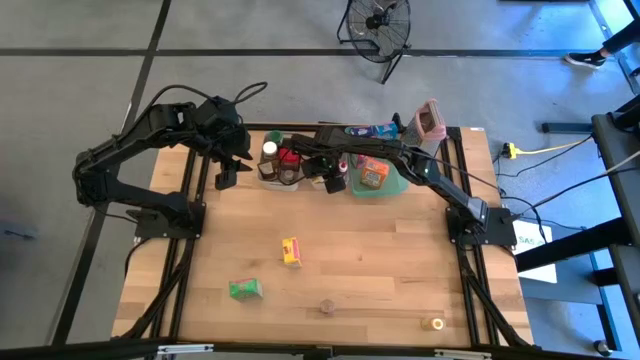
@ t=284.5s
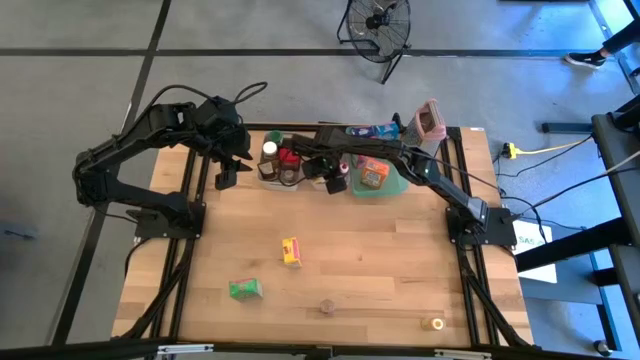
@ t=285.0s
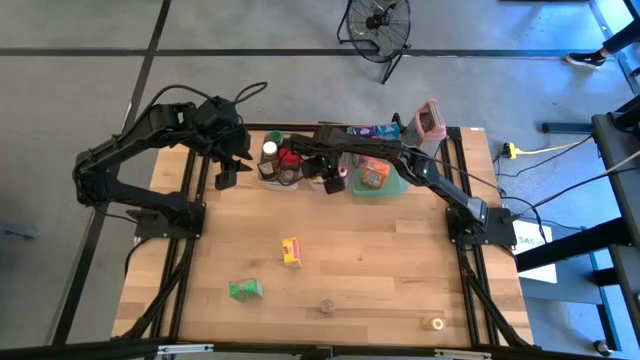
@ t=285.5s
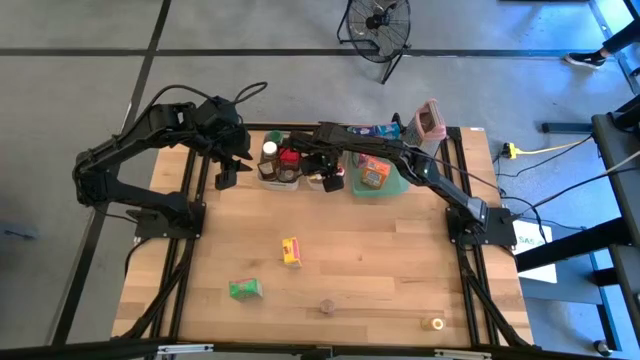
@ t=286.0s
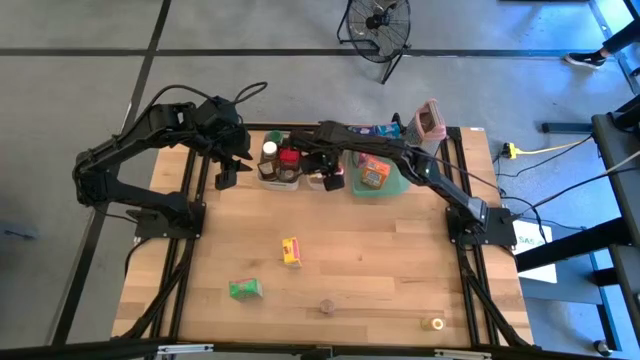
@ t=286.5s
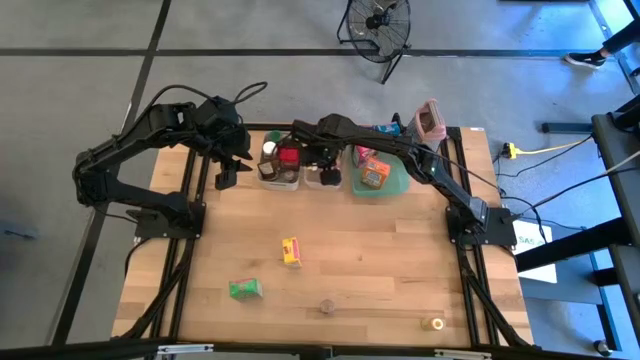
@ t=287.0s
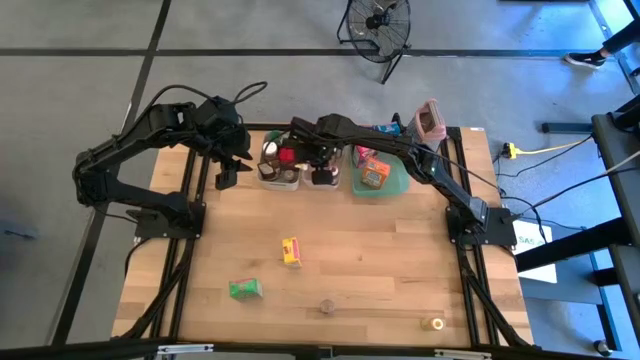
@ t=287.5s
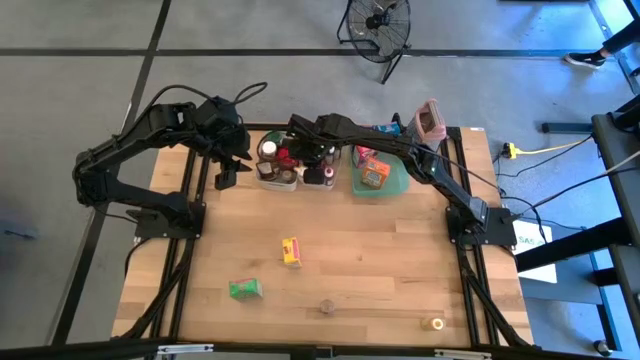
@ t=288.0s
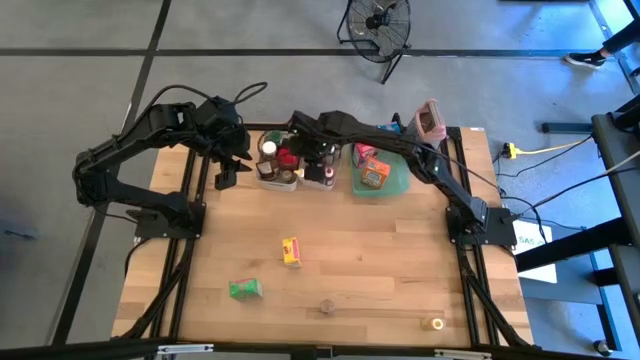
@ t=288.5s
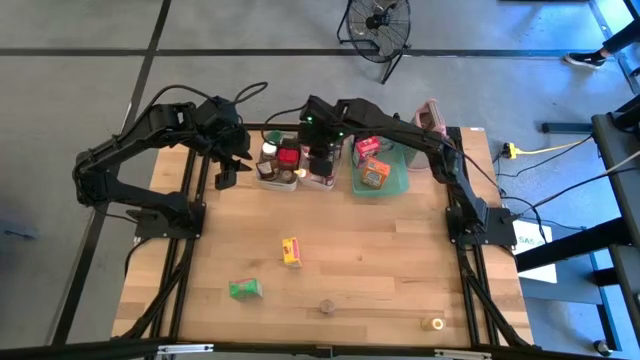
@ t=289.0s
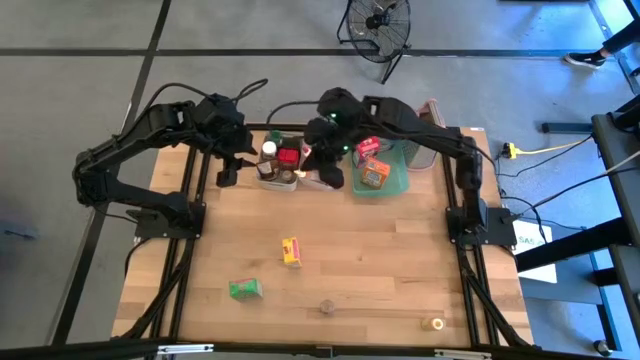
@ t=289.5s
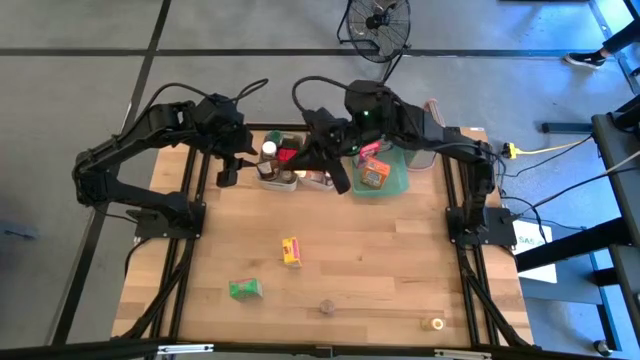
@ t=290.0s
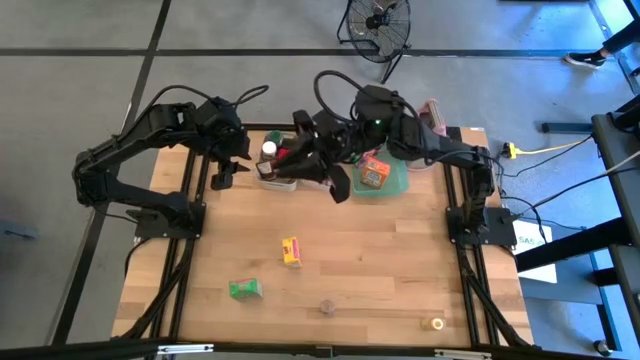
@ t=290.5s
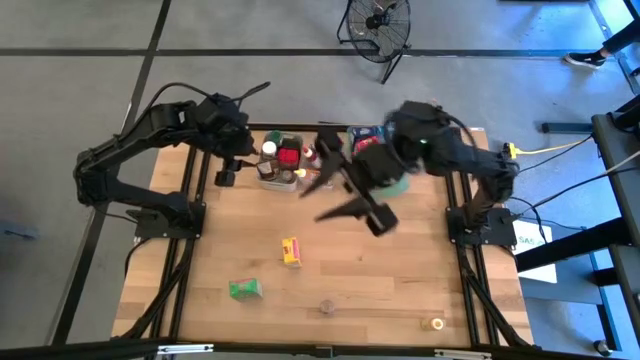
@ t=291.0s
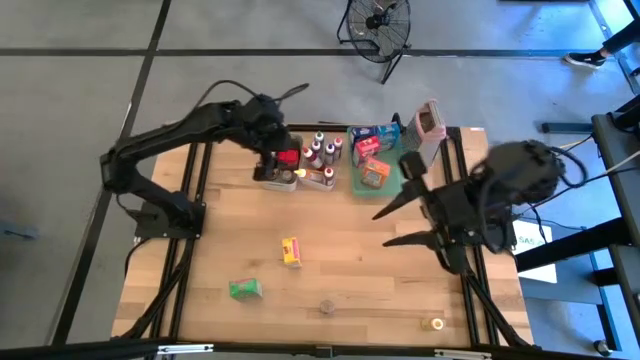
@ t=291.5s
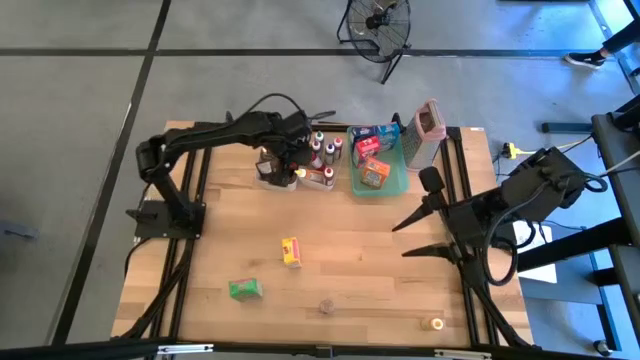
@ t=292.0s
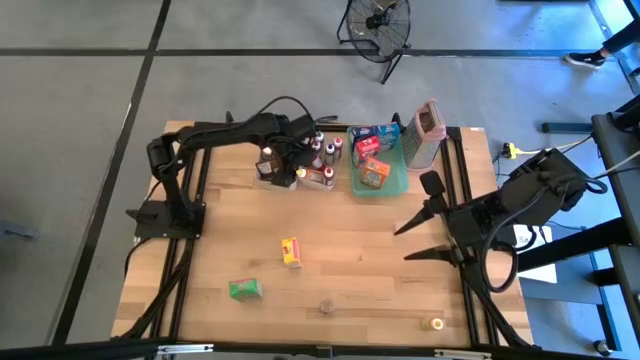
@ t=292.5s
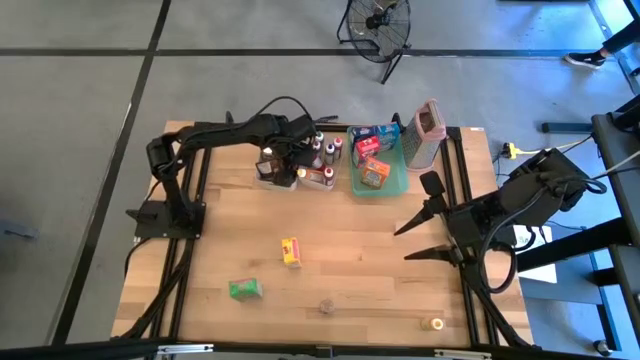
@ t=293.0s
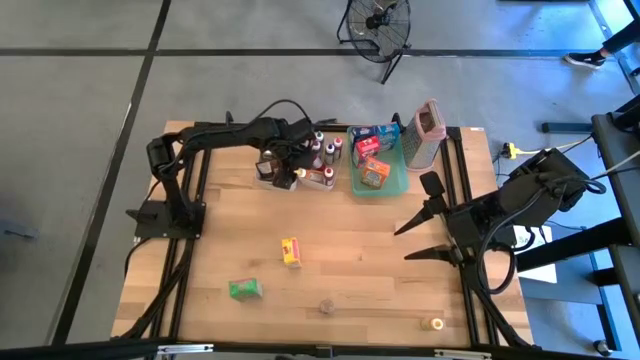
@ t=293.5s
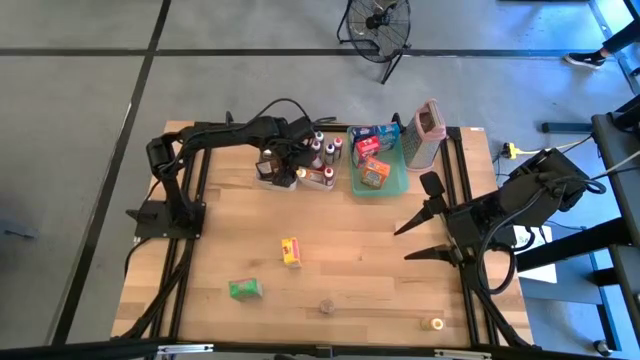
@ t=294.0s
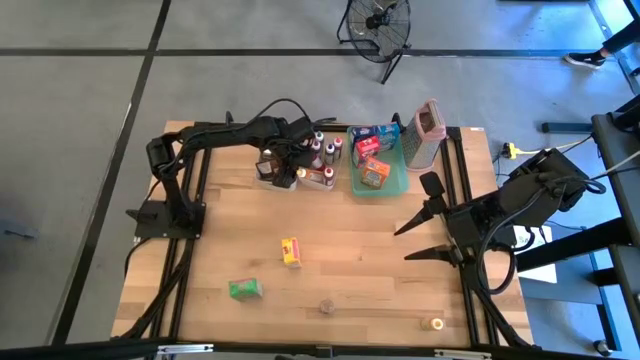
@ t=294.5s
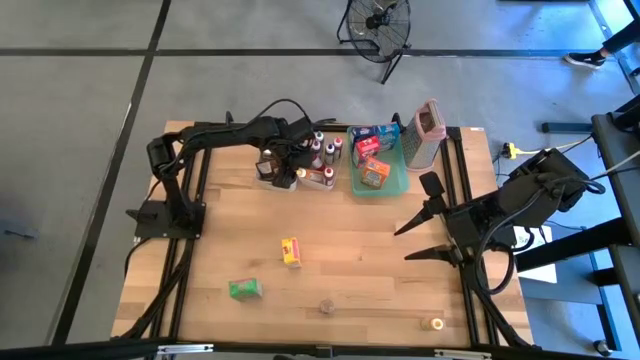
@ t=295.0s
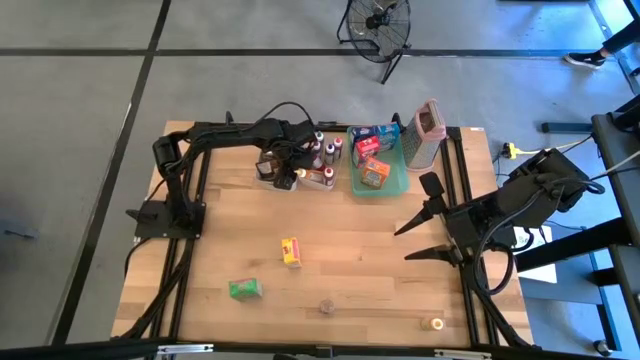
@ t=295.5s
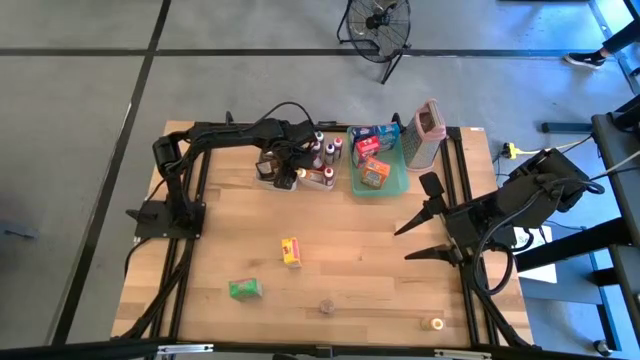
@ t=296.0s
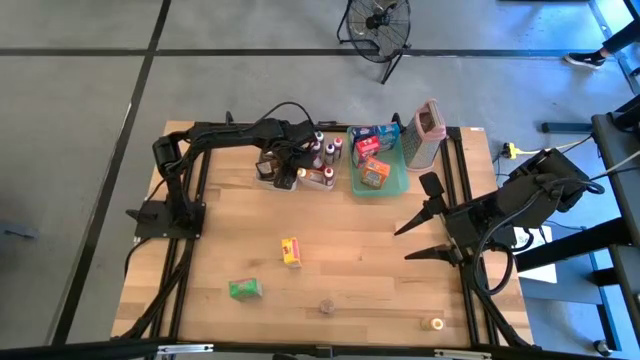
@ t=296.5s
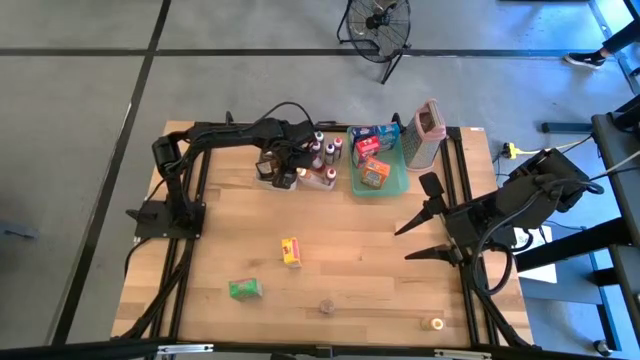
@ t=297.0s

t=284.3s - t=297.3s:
Task: Pick & Place Kitchen Items
Adjust the yellow food coloring bottle in the transparent bin

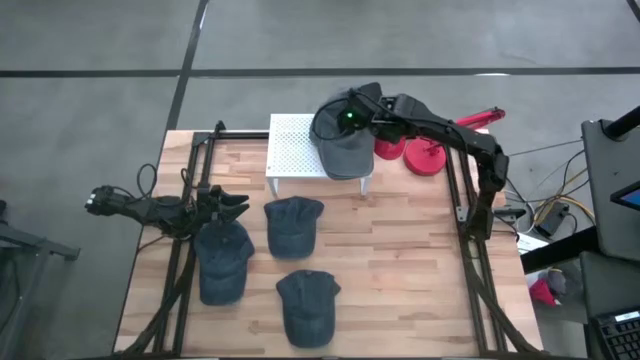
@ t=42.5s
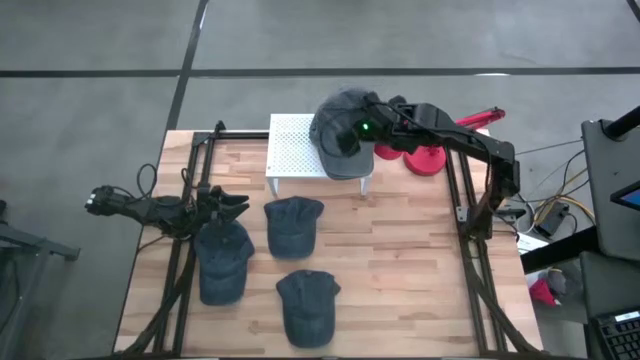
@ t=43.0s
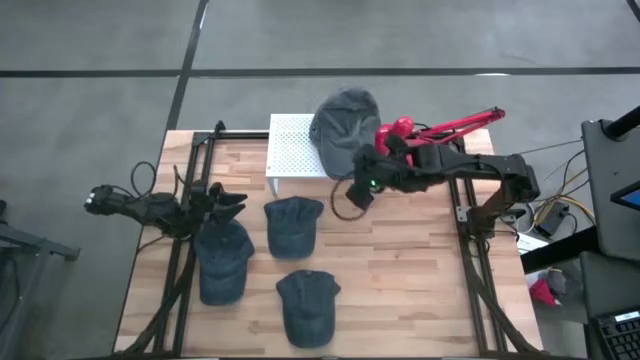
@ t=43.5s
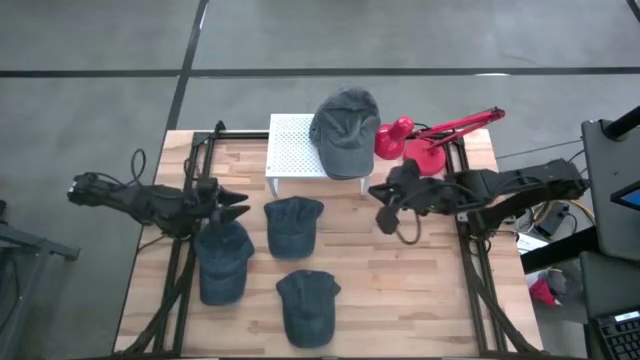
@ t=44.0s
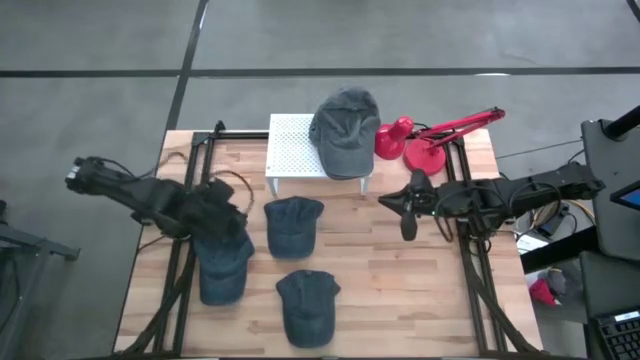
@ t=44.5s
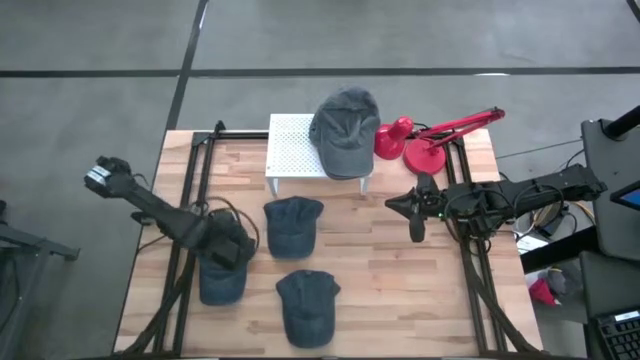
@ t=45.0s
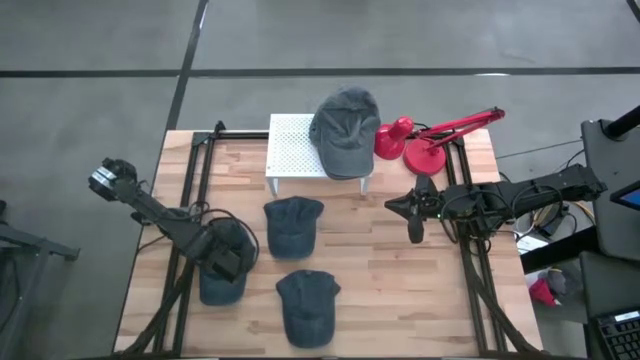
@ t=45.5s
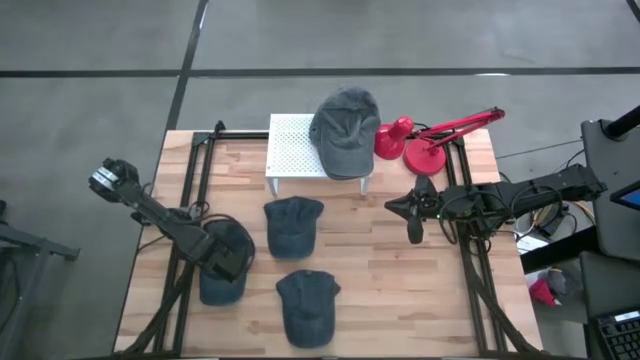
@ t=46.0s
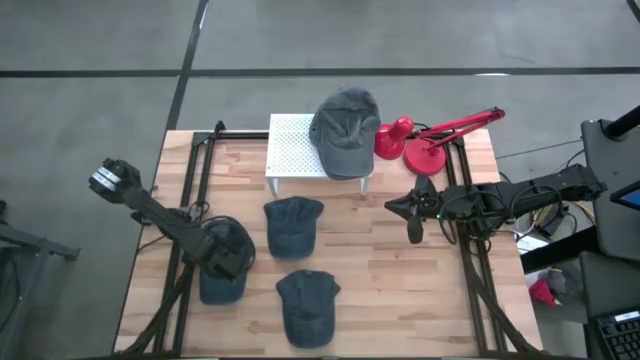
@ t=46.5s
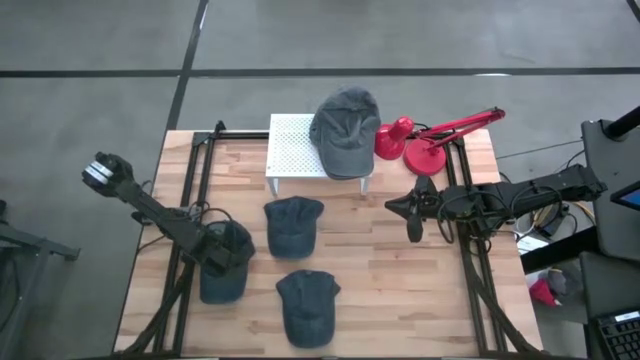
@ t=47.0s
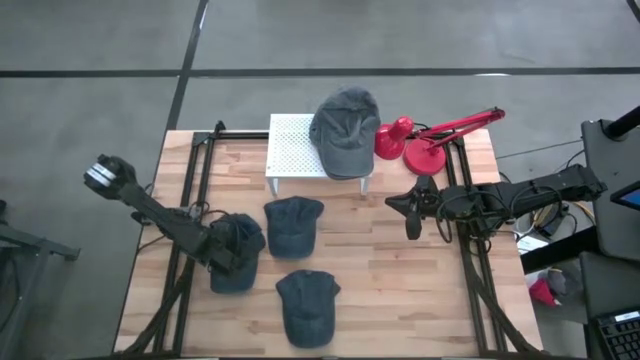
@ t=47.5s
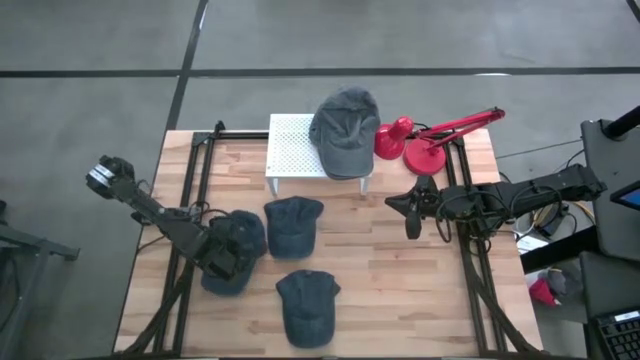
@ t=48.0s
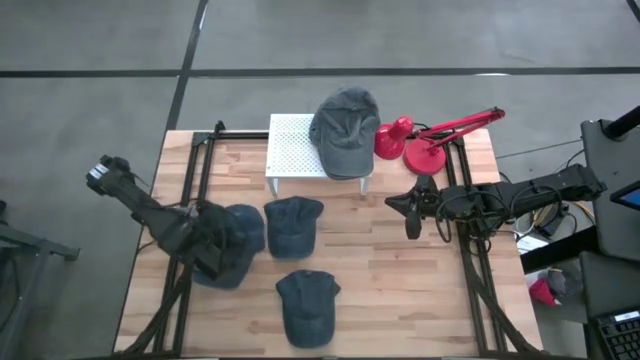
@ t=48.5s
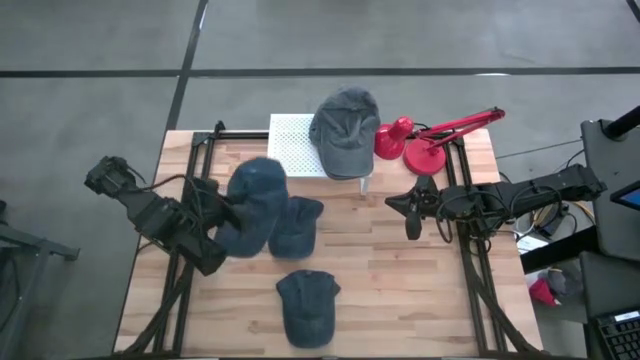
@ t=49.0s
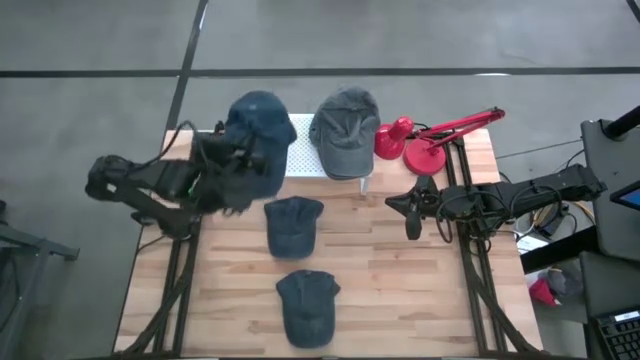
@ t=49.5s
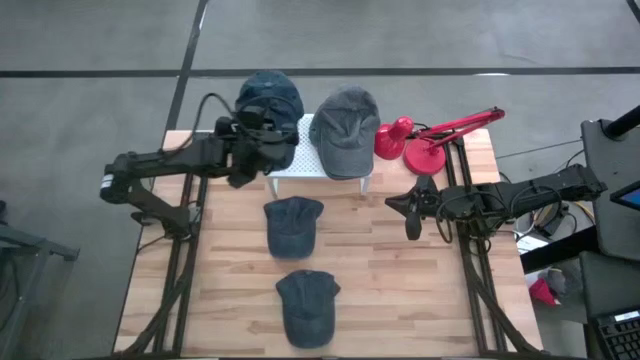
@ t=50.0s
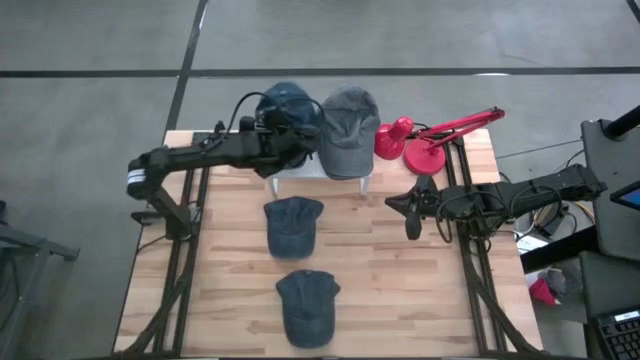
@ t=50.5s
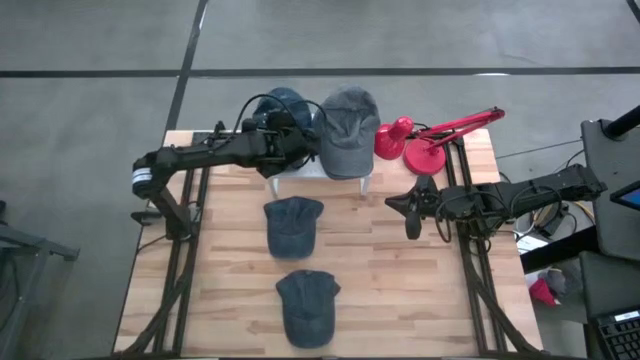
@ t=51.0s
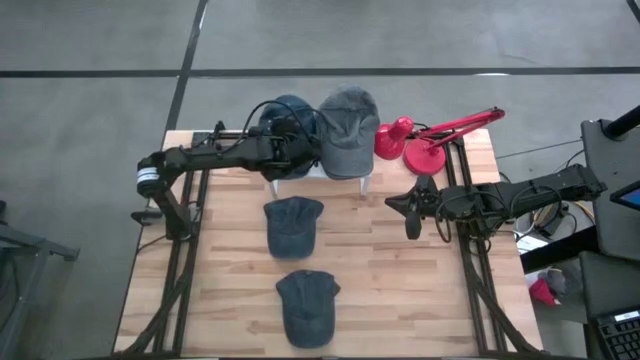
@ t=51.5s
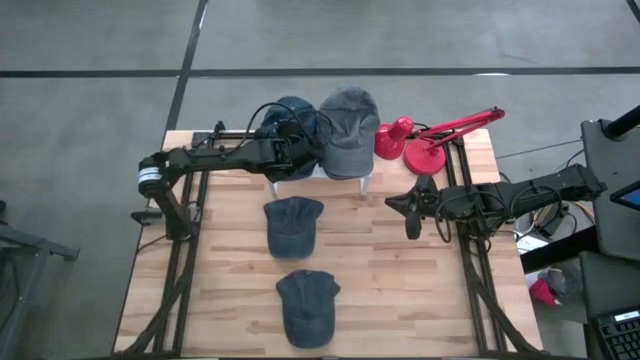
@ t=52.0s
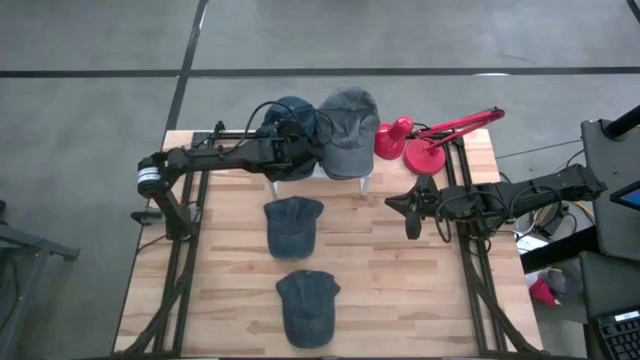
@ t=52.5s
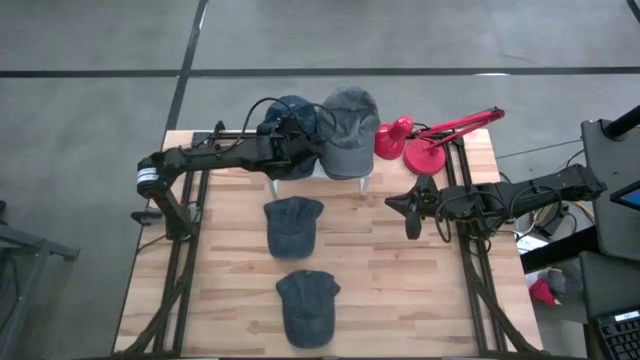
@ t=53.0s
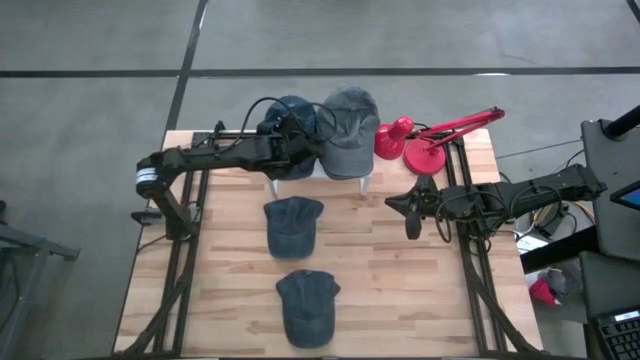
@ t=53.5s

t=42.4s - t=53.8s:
Task: Pick & Place hat
Put the left black cap on the shelf
